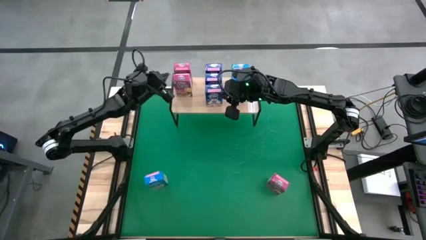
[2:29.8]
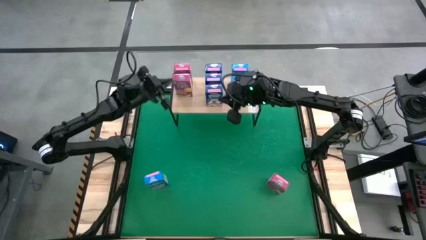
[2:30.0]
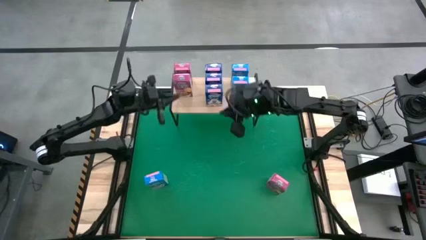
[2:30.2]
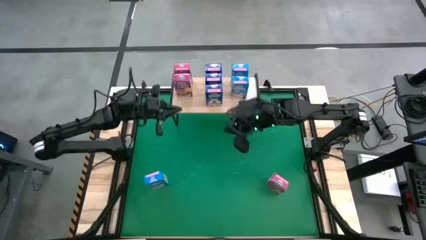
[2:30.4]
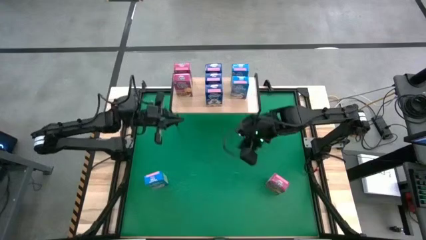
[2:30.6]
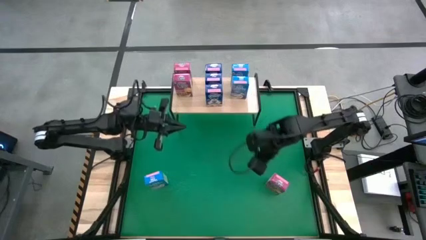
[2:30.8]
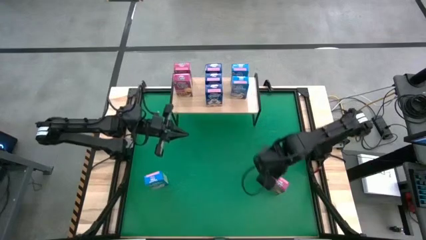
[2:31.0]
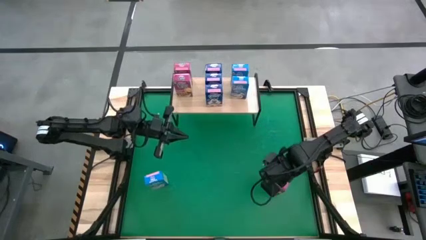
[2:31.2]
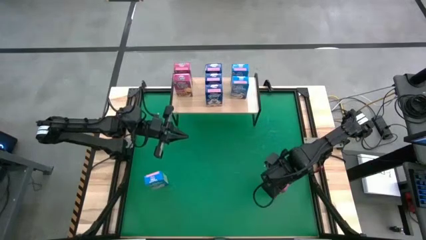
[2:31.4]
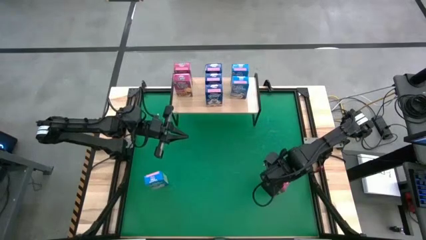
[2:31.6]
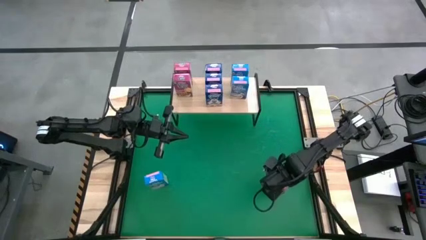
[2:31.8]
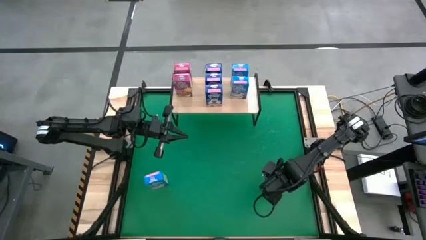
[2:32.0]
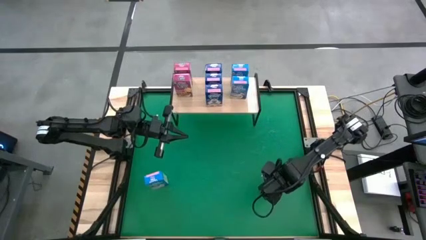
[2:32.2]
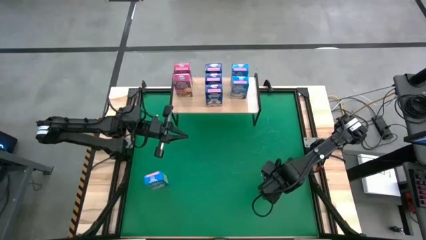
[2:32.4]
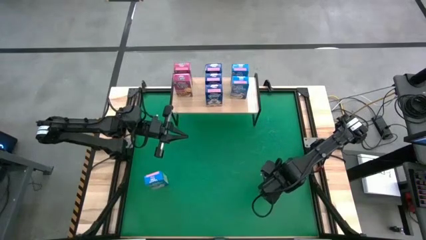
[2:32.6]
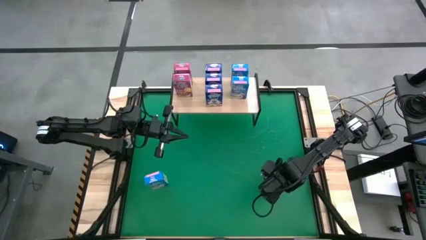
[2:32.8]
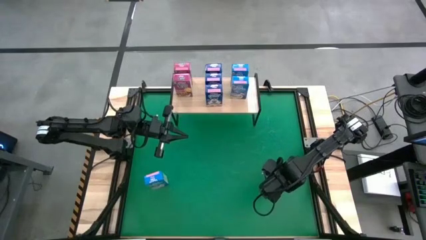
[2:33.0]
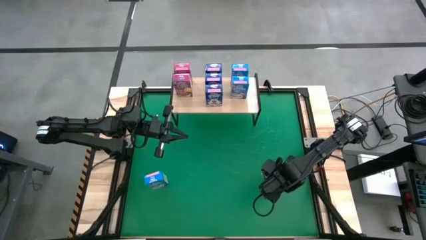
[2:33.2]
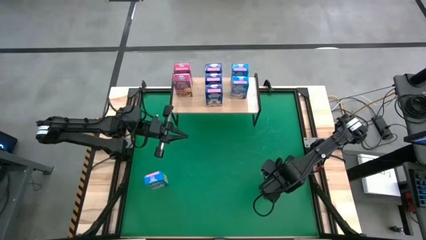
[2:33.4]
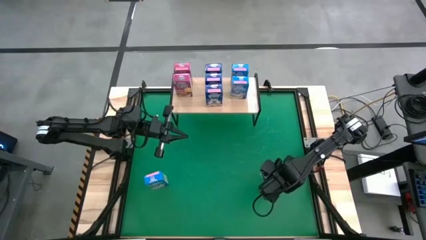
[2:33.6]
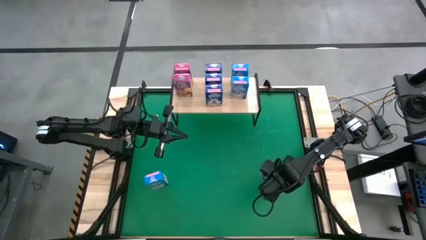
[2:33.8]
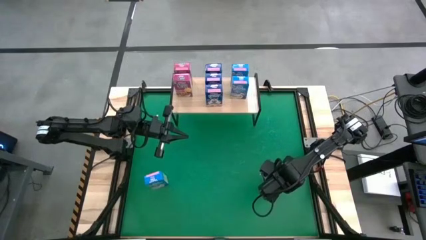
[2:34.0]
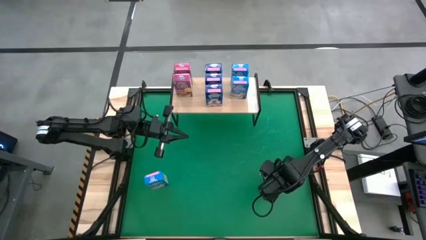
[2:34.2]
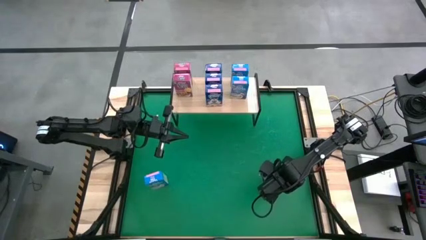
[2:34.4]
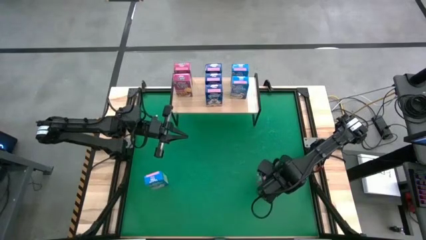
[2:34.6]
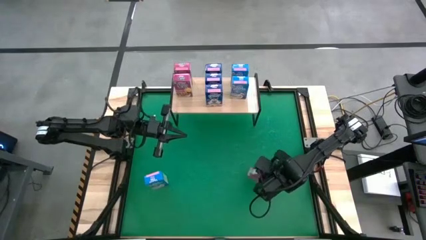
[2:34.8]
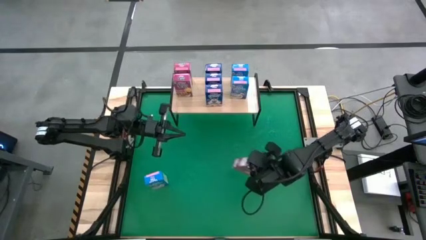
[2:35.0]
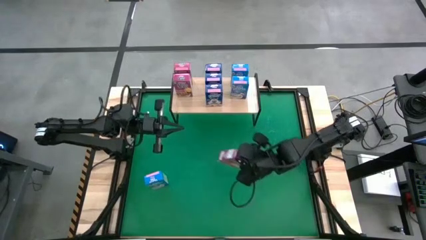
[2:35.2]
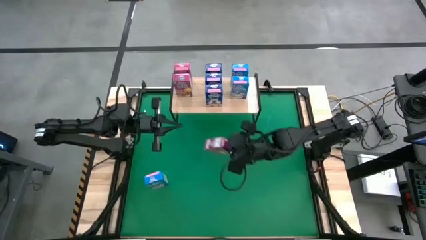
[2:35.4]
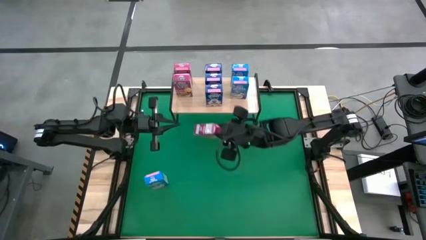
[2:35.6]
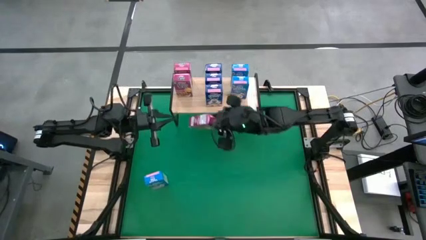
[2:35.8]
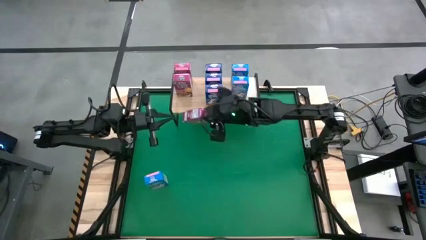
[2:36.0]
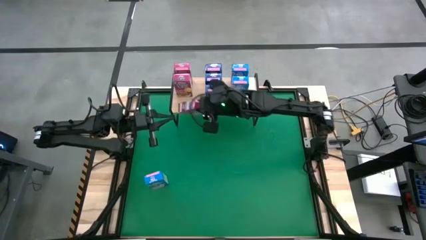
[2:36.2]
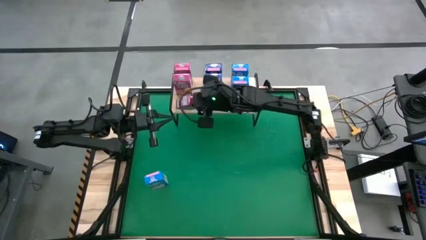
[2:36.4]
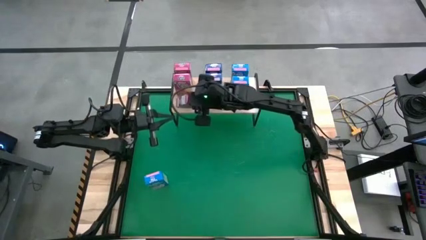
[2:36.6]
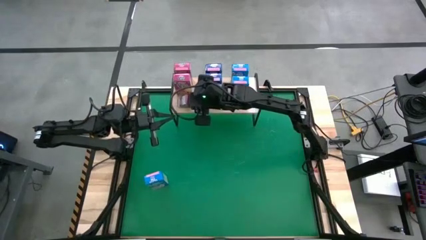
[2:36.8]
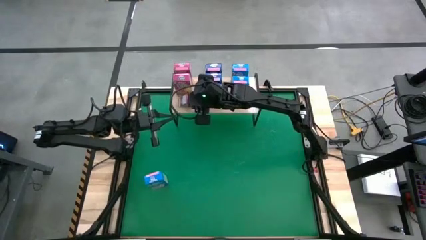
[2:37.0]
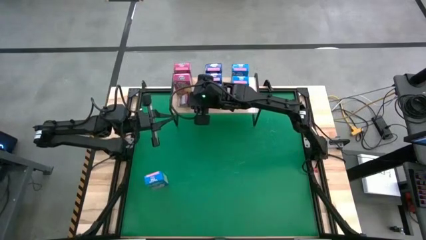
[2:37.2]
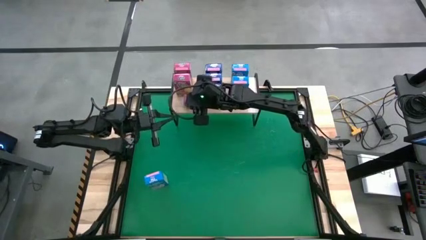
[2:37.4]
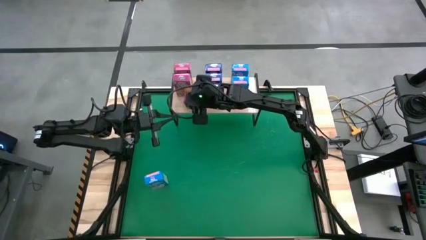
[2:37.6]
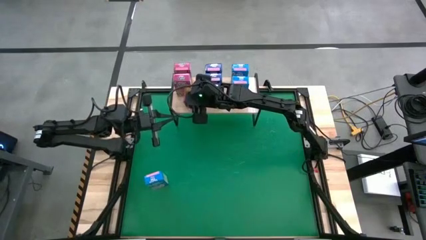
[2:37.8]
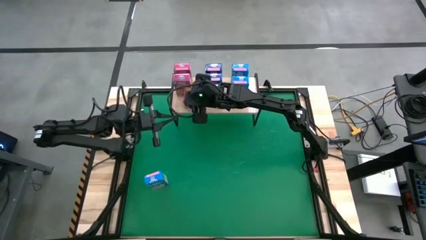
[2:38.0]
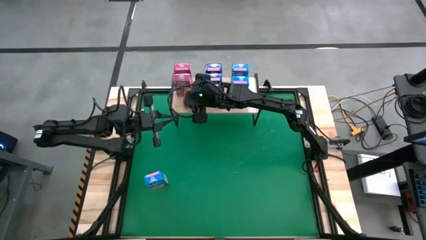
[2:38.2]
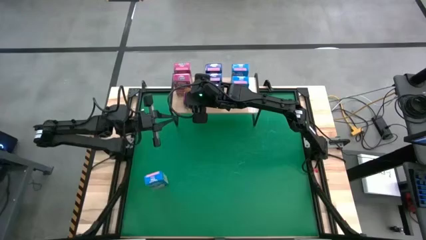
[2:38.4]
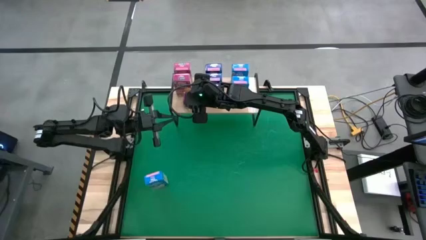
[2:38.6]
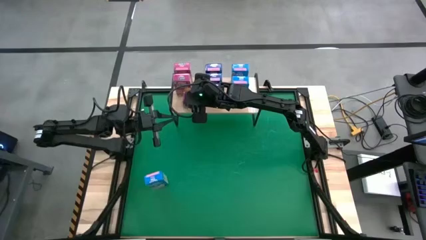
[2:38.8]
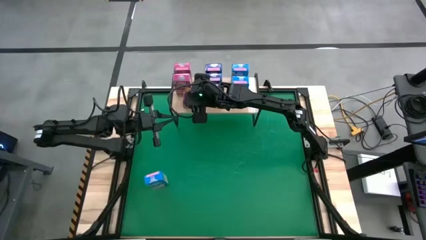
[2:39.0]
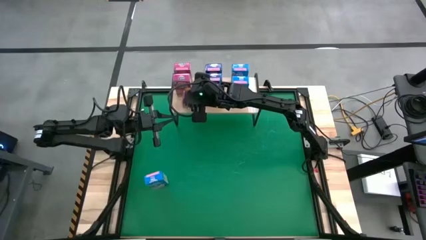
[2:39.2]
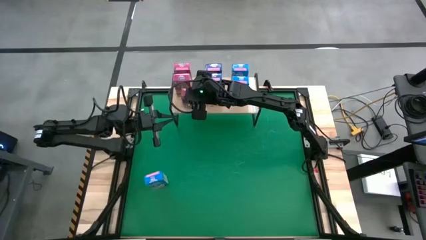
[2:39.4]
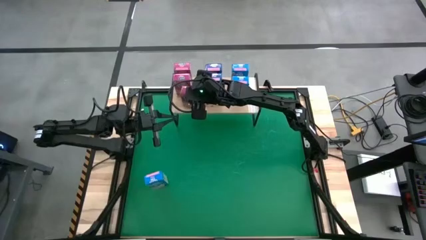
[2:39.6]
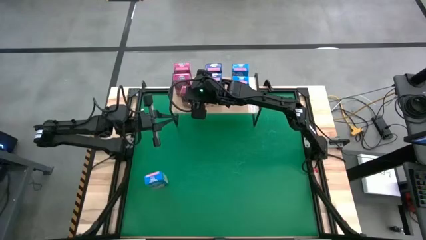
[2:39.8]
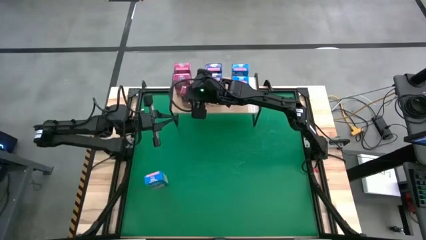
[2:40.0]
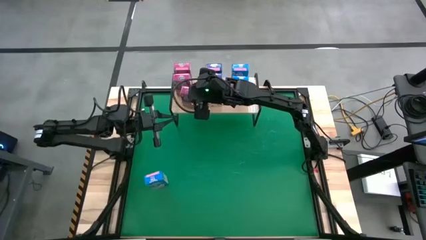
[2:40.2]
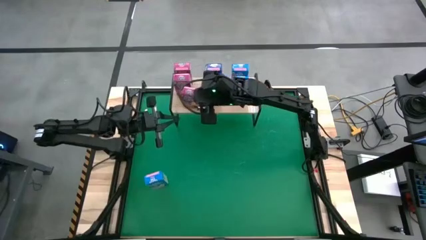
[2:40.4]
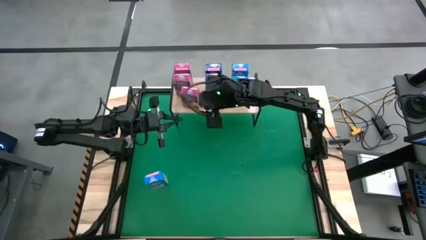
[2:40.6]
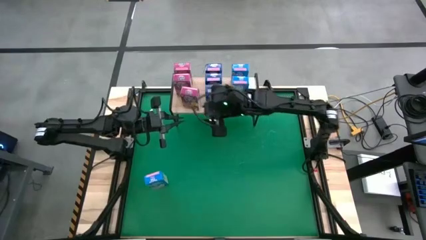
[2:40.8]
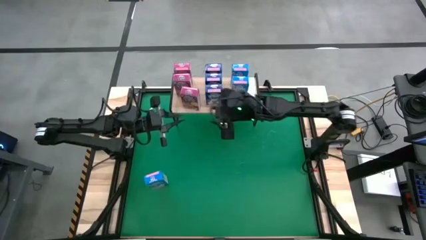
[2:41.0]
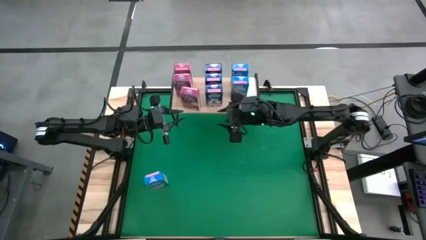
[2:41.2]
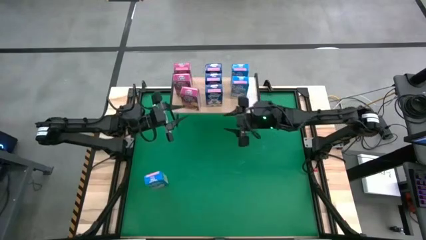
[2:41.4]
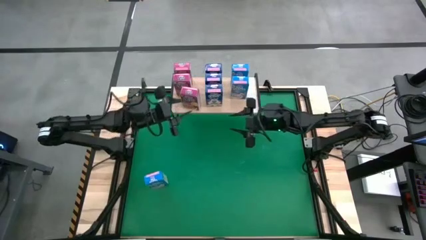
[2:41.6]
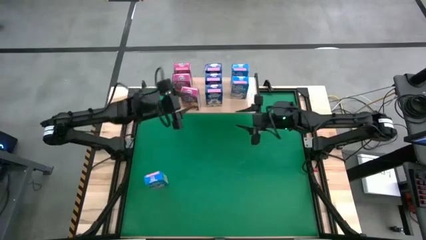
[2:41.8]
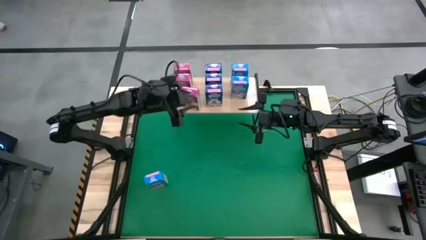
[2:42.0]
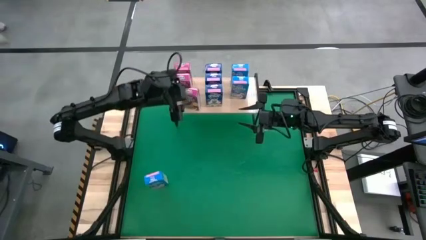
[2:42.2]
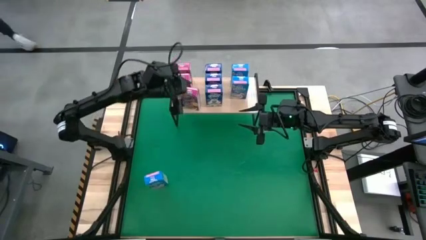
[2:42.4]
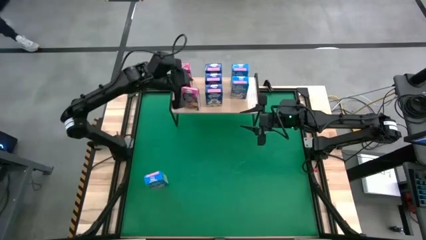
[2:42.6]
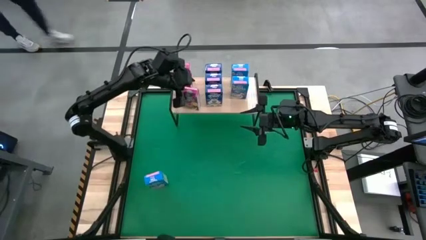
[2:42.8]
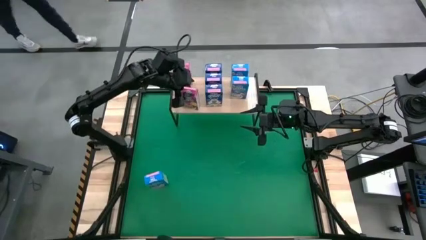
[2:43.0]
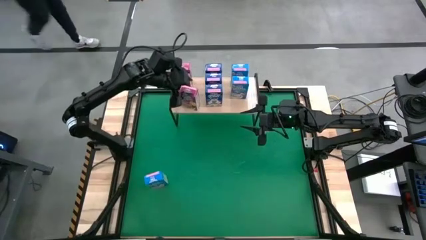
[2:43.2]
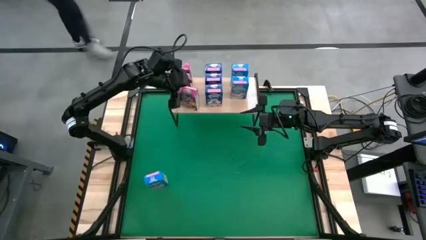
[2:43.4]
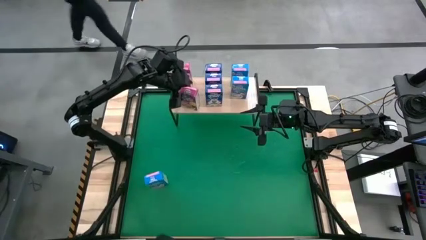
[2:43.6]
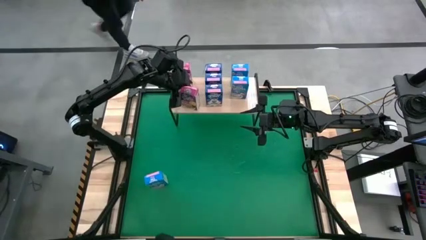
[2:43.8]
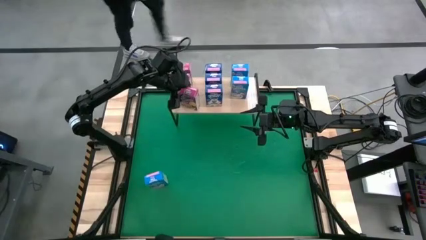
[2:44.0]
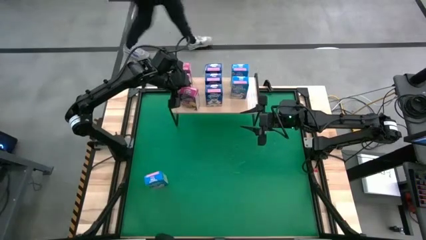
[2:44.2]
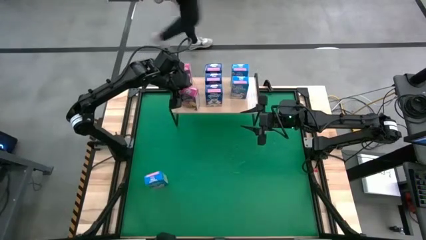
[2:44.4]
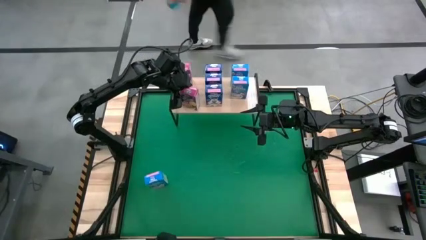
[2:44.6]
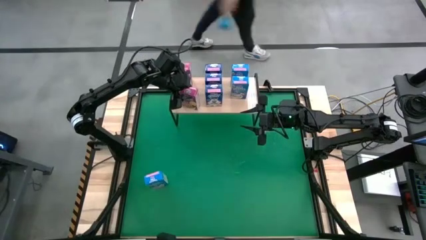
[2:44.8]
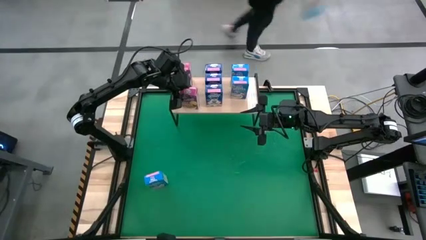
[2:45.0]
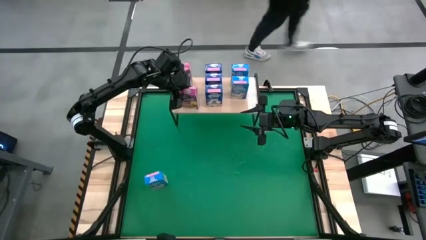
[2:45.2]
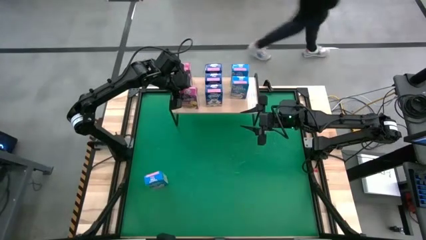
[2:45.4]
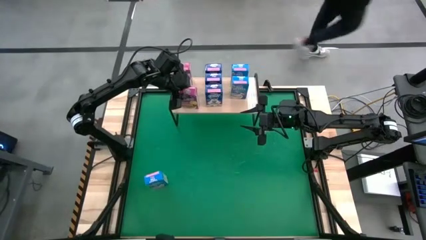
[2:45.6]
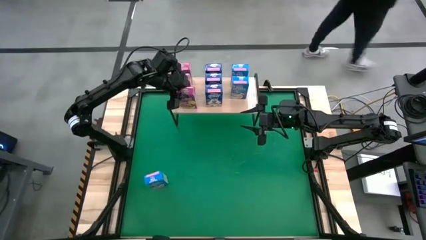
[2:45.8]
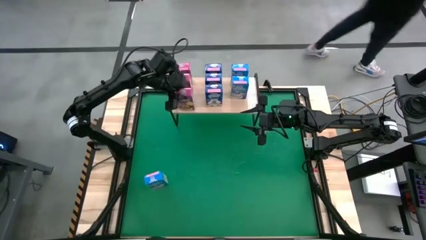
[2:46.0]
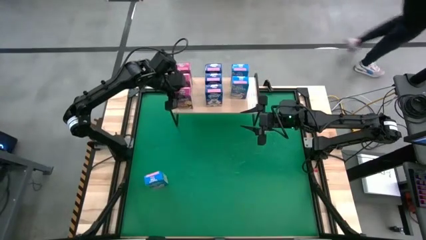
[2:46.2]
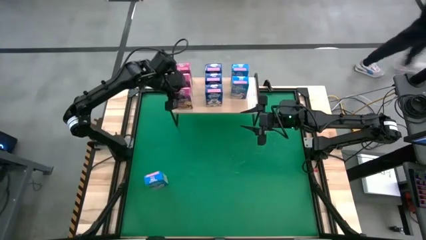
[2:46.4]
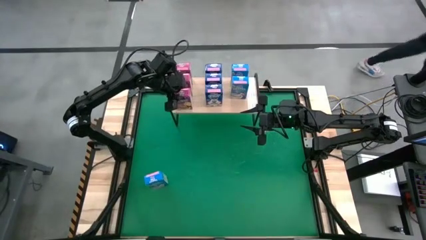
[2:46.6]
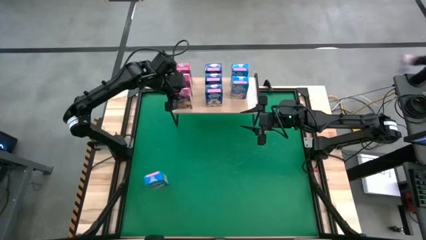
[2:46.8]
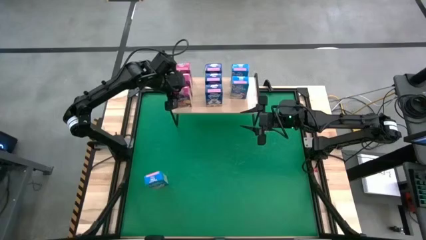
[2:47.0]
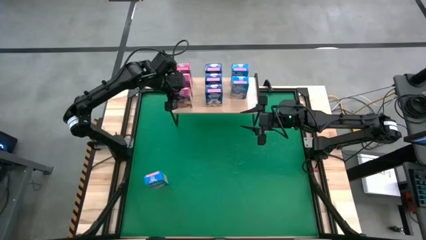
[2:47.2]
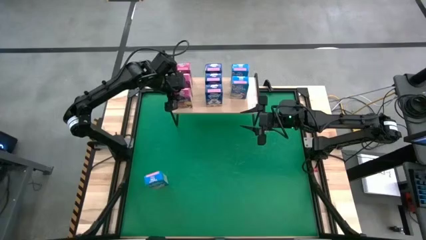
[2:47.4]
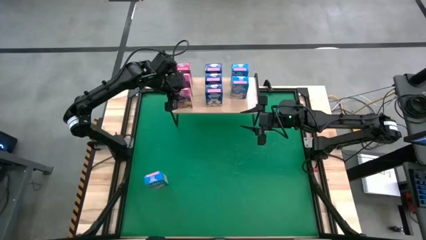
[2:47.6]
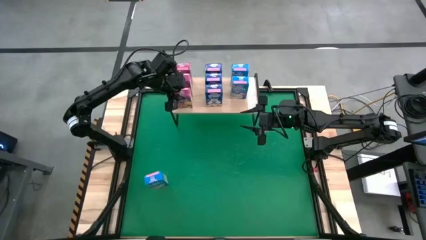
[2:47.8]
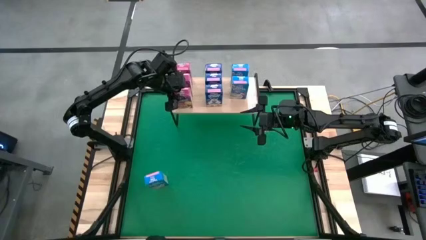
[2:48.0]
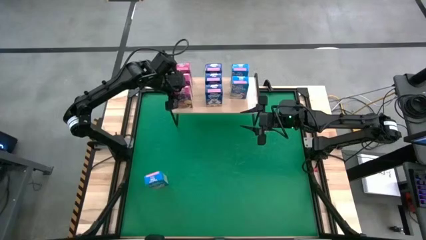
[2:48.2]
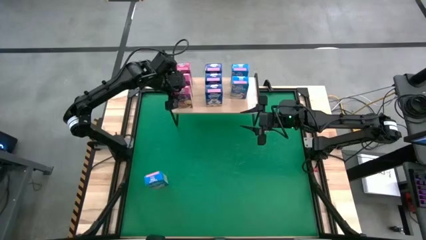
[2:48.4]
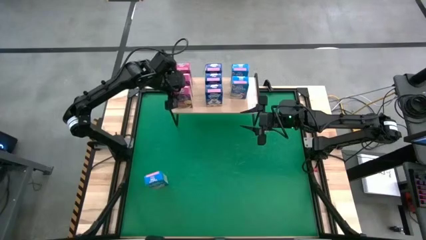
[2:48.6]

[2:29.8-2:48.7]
Task: Stack cereal on shelf
Put the violet cereal box on the shelf aligned with the other violet cereal boxes
